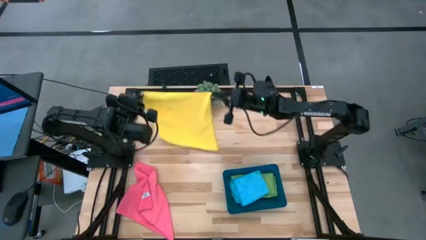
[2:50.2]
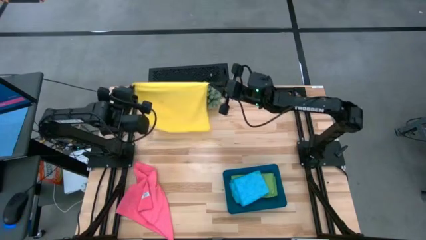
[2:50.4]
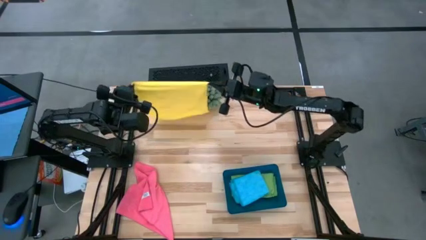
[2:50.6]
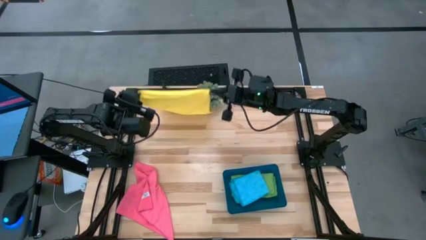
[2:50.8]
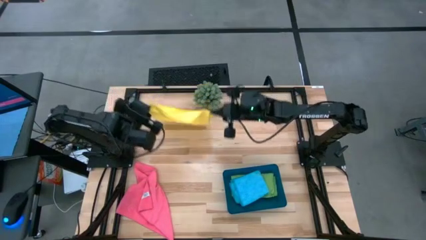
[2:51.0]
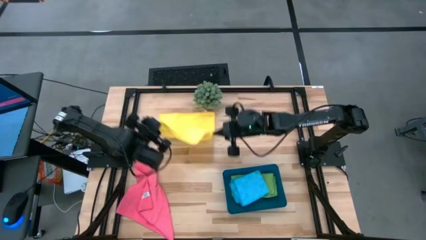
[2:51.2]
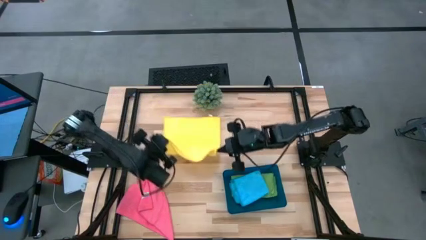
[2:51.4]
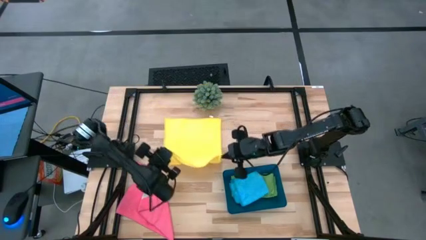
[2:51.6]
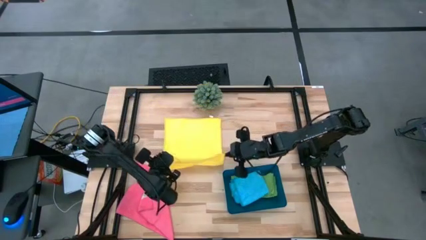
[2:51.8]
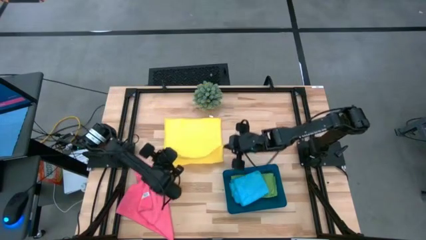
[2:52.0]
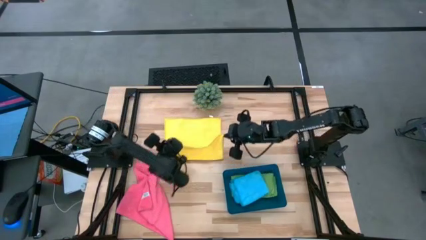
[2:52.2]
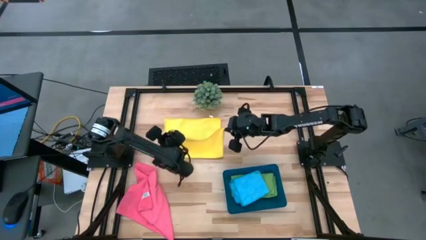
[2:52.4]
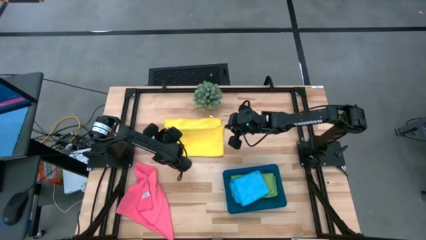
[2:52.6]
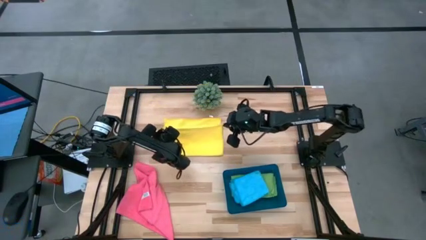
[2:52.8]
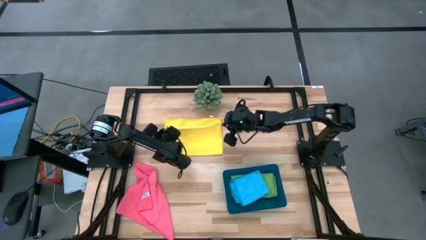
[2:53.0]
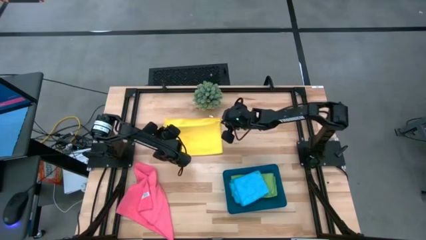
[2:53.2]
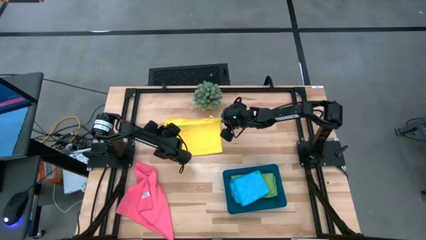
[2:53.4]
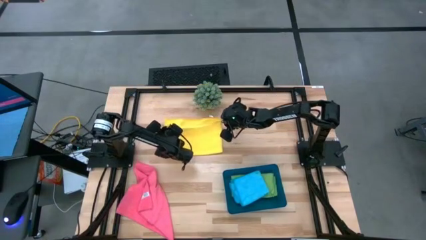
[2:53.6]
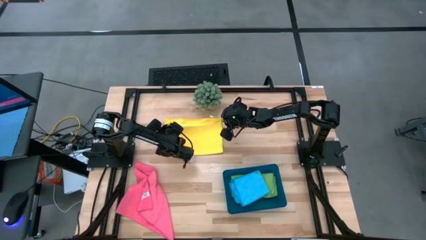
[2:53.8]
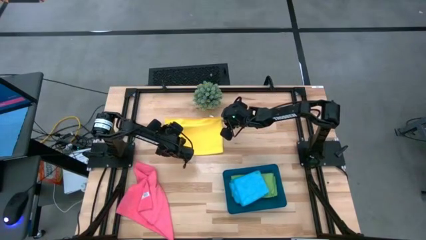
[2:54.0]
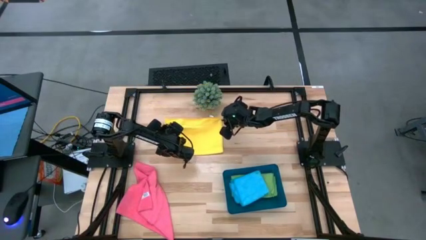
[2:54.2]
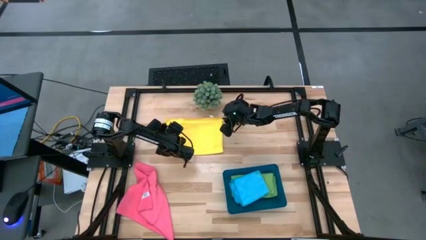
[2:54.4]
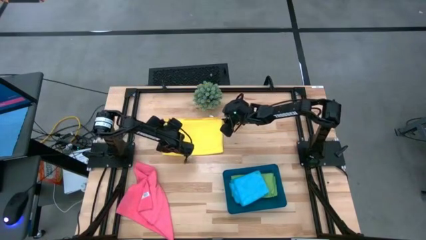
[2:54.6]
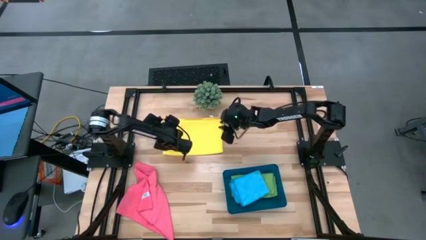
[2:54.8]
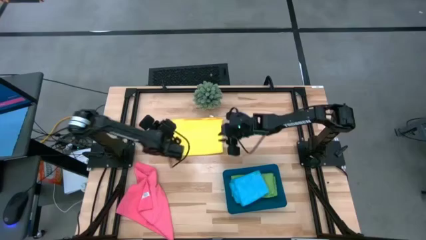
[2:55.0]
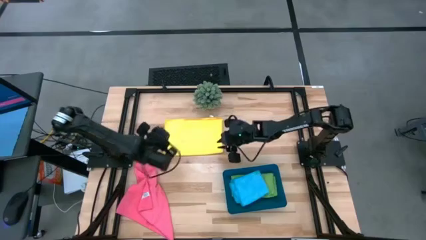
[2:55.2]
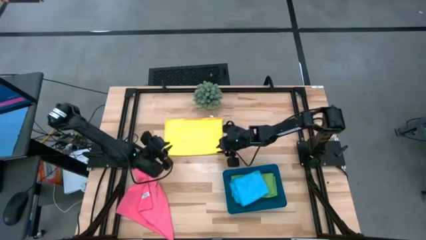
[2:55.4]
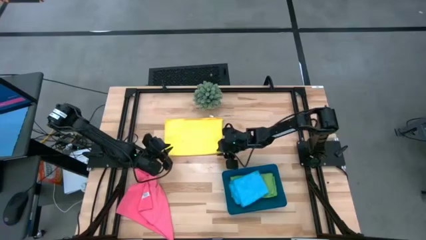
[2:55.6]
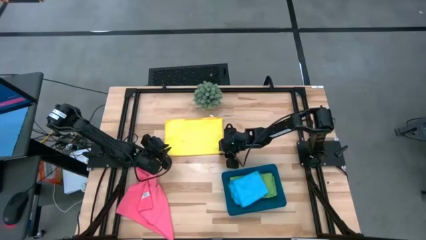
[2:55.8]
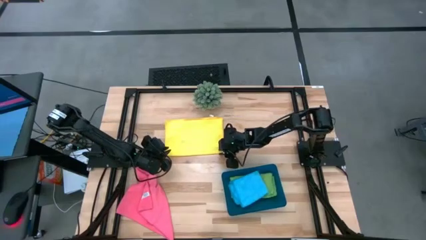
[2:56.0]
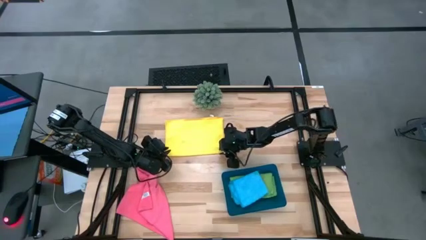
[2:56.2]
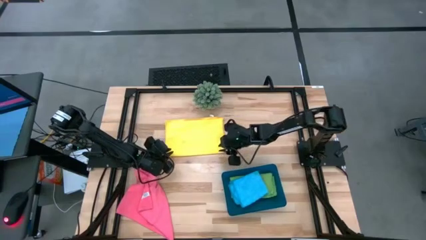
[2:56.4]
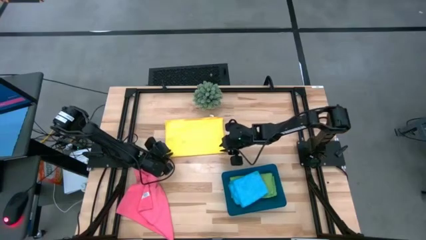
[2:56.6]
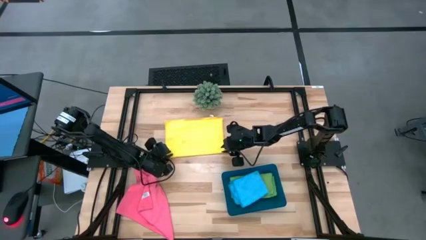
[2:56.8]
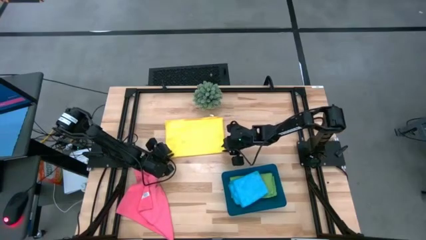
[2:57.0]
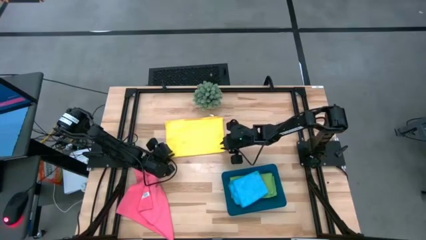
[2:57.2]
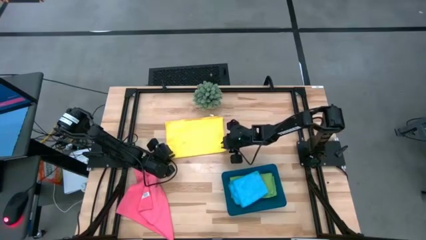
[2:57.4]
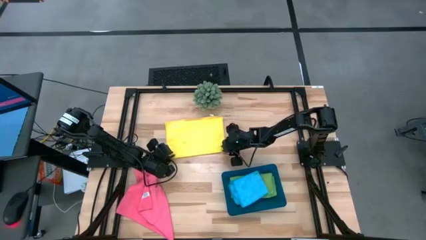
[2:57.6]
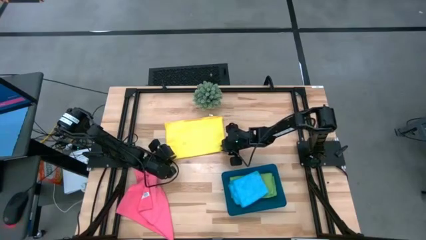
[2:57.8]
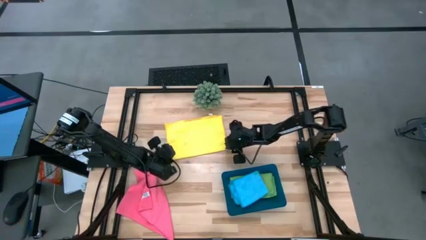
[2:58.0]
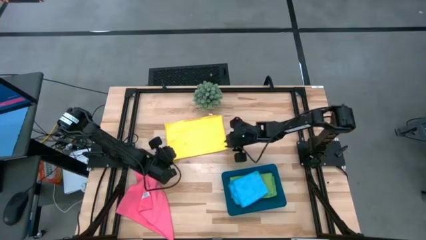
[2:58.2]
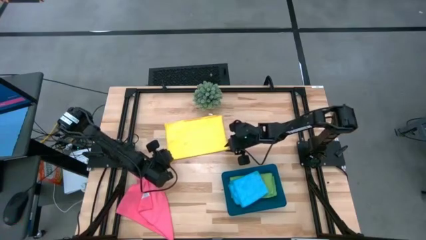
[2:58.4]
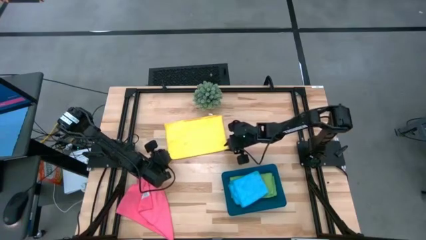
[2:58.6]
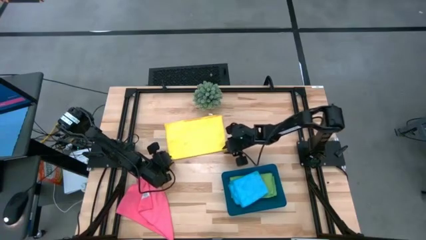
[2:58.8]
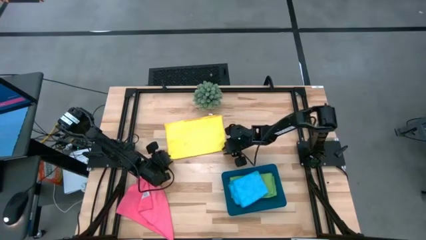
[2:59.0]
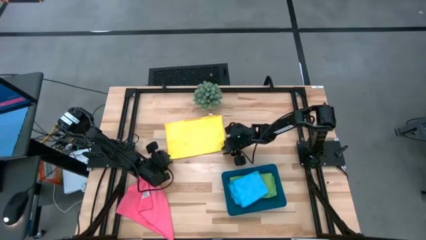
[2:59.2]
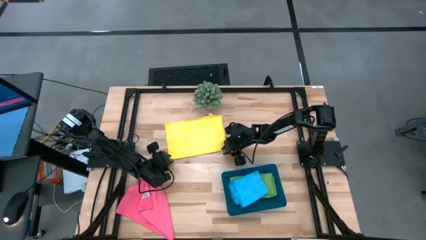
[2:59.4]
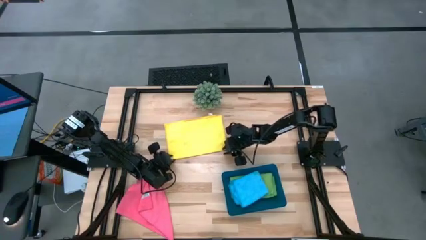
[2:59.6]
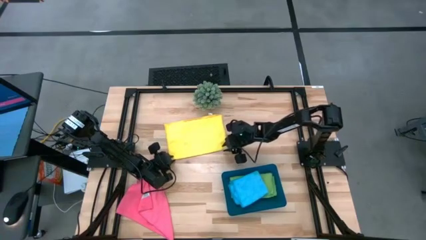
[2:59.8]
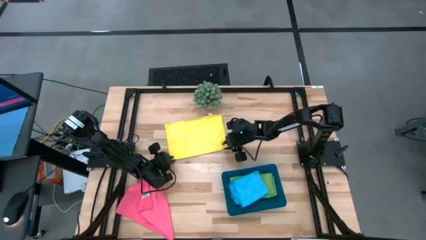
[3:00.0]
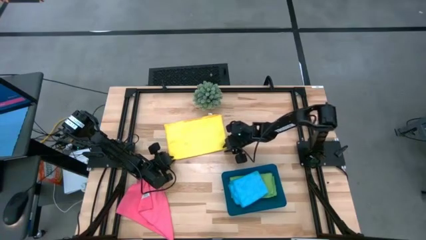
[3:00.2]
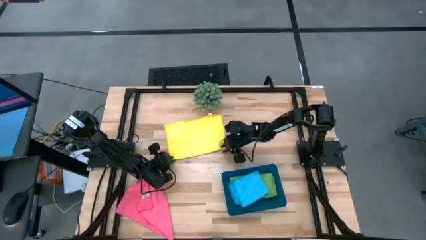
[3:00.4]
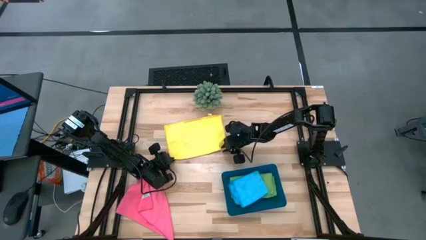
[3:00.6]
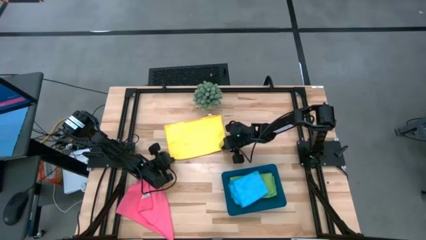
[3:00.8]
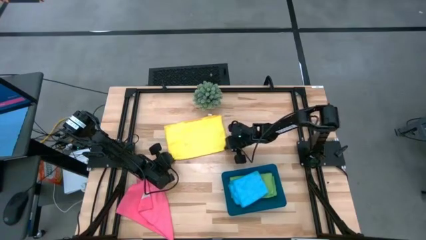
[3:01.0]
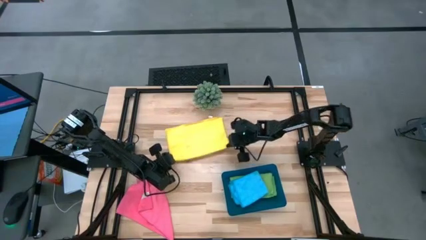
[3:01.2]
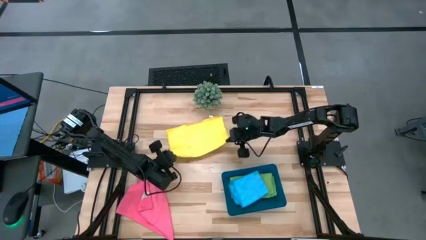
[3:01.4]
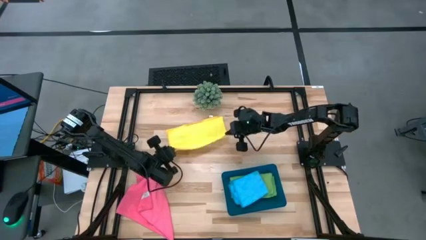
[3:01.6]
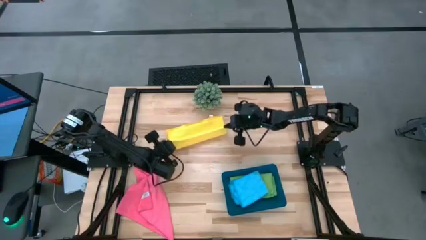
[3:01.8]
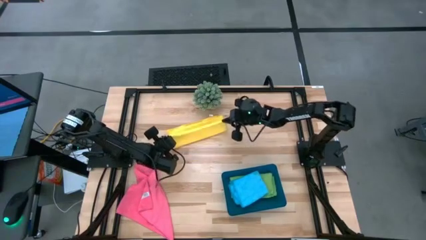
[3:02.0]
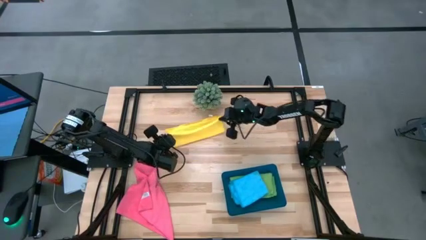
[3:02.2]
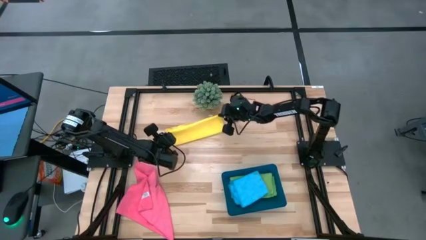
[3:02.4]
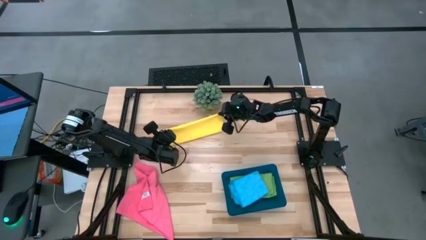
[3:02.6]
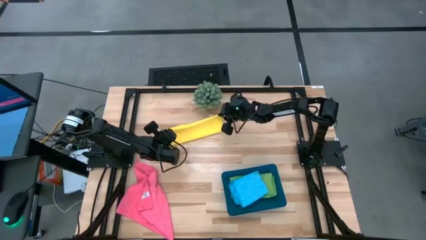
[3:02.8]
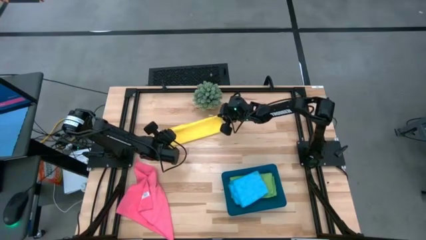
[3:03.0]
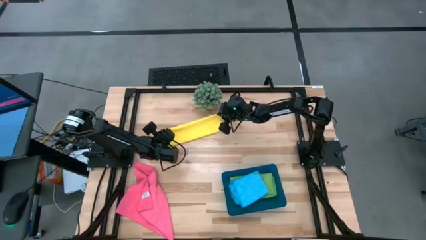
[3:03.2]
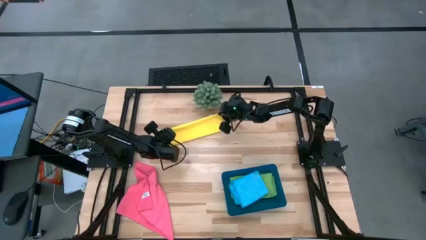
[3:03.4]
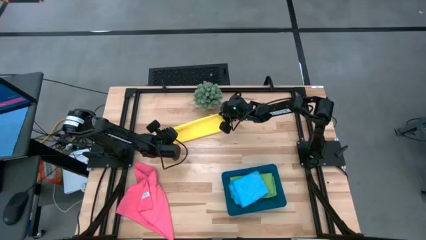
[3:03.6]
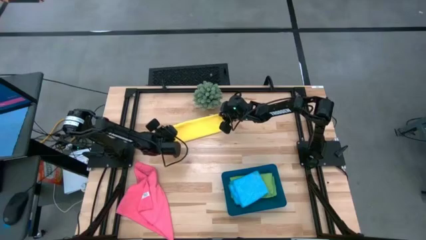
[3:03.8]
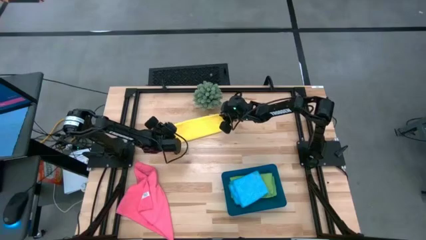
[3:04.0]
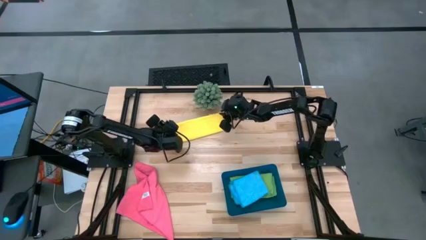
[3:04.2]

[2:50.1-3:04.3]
Task: Fold microfiber towels
Fold the yellow microfiber towel

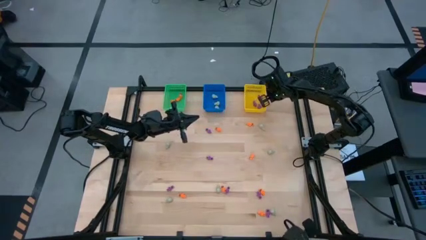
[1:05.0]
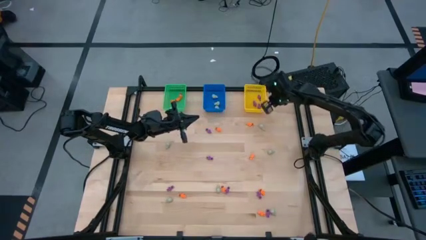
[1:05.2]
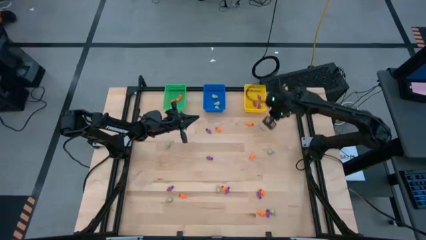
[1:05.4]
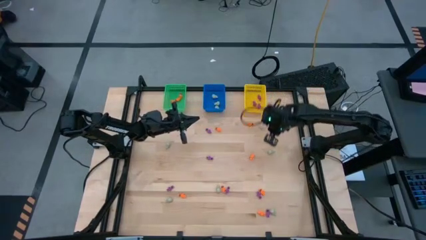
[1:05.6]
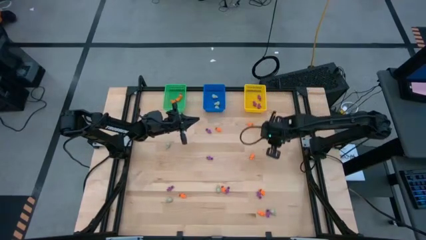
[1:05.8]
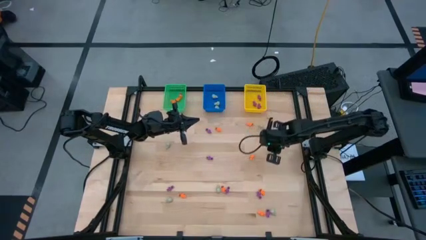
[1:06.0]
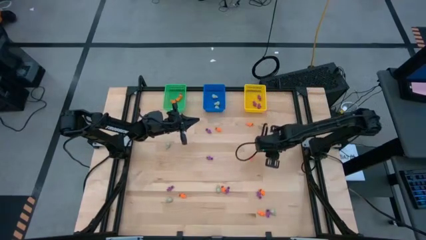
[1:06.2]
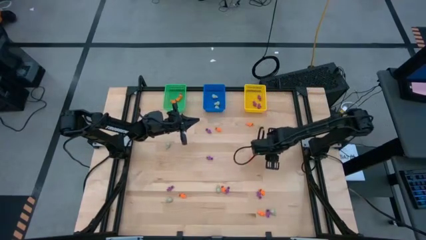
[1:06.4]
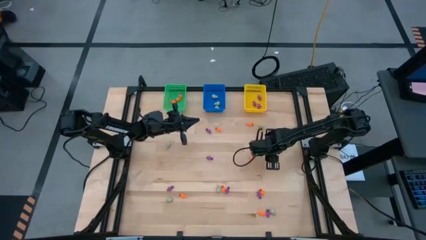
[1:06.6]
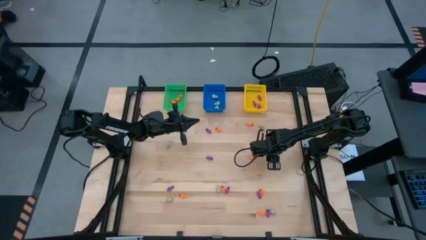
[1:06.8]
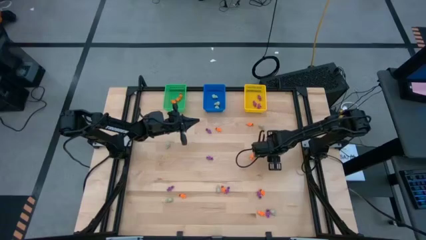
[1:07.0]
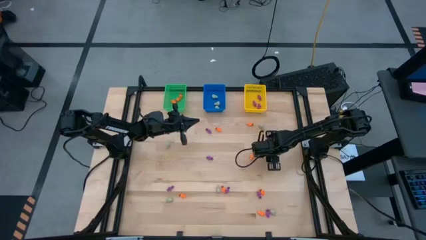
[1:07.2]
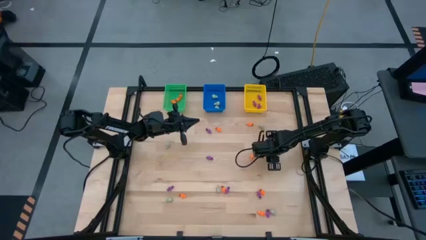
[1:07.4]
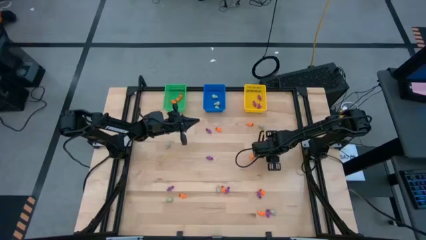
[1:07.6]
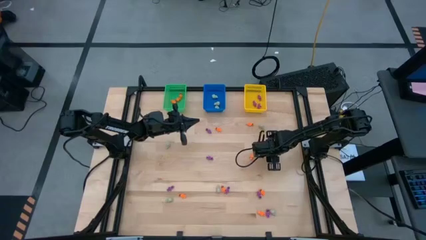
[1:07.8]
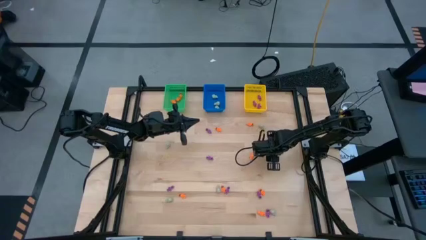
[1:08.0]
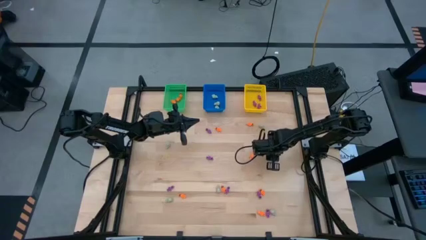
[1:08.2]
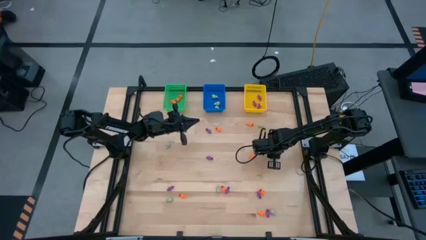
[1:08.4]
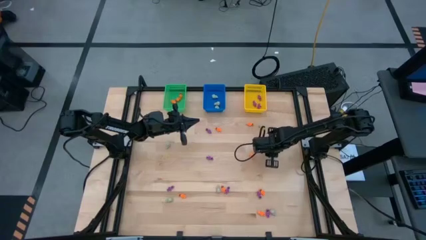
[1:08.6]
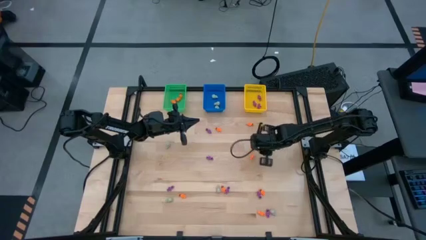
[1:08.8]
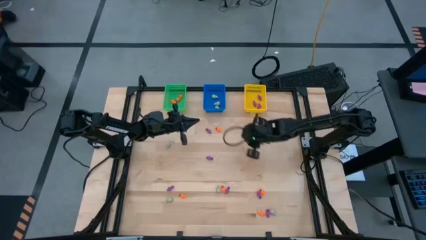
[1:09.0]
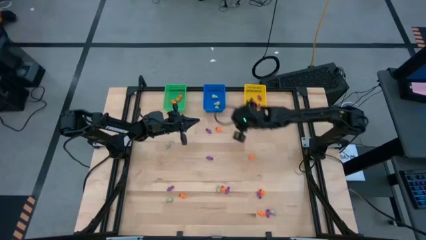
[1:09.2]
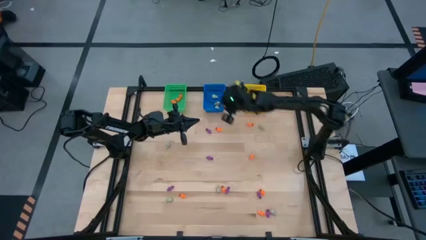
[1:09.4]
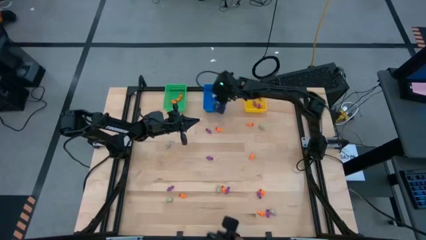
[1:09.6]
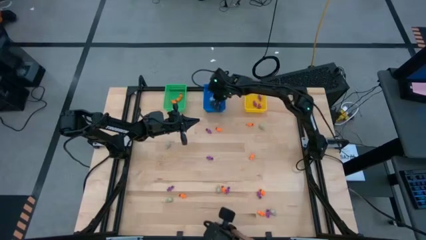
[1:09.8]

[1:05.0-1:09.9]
Task: Sort Halloween decoration
Put the white skull toy into the blue bin
